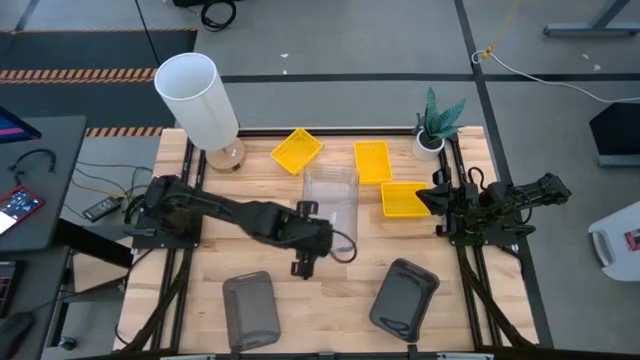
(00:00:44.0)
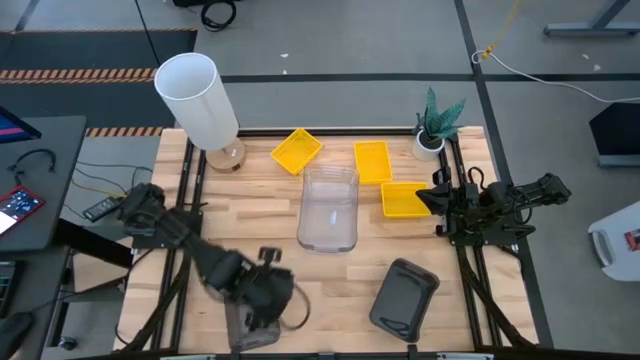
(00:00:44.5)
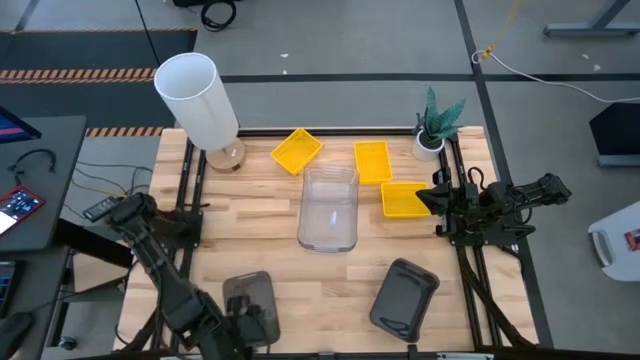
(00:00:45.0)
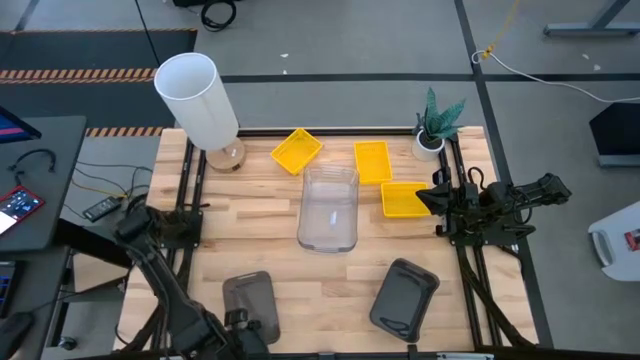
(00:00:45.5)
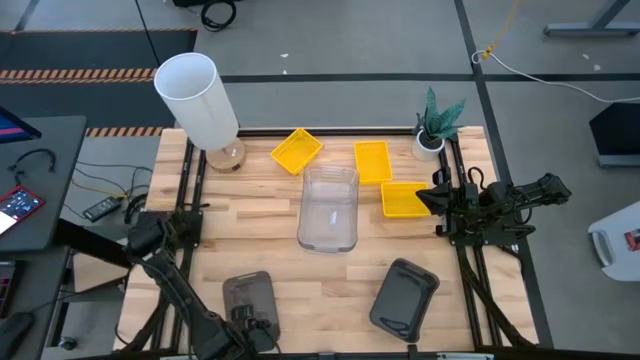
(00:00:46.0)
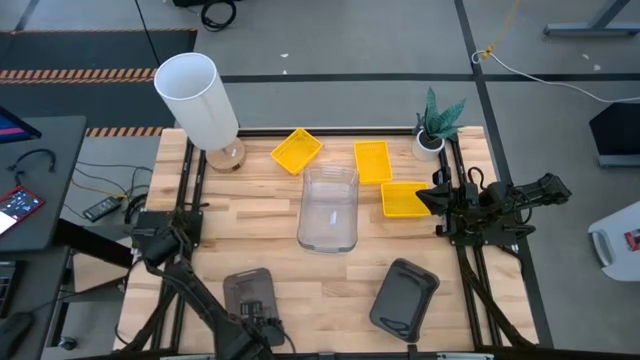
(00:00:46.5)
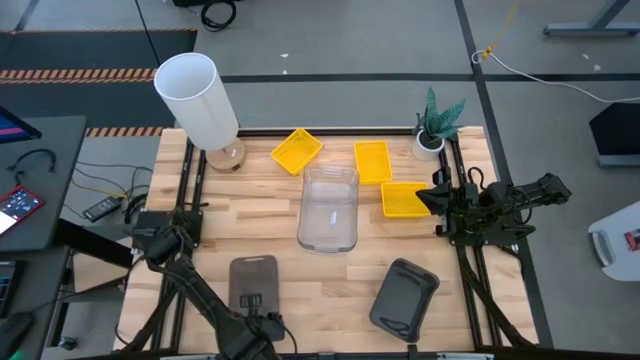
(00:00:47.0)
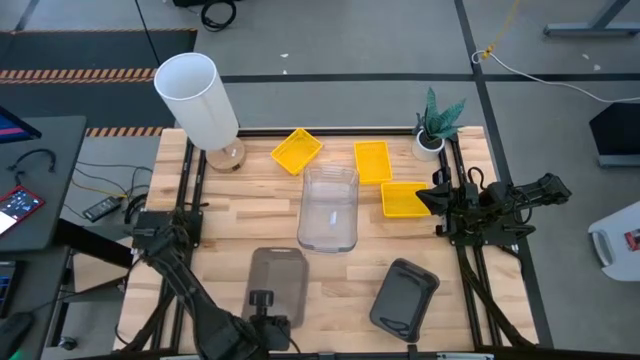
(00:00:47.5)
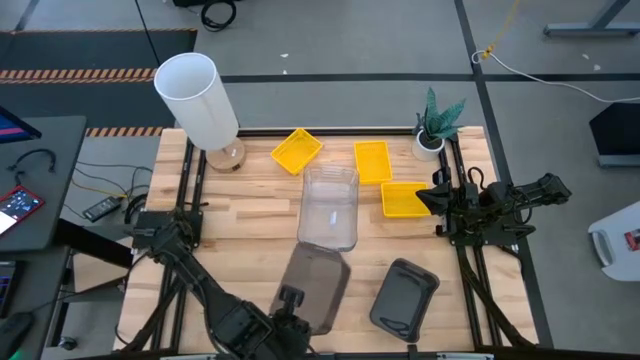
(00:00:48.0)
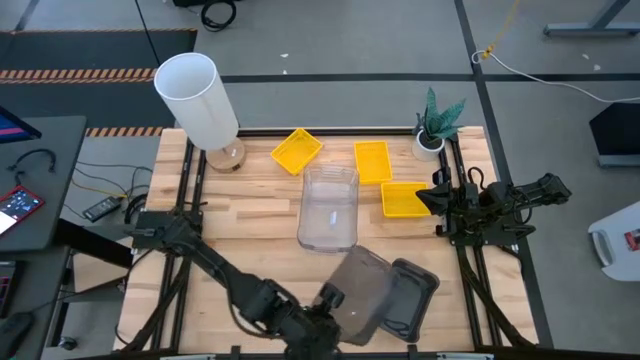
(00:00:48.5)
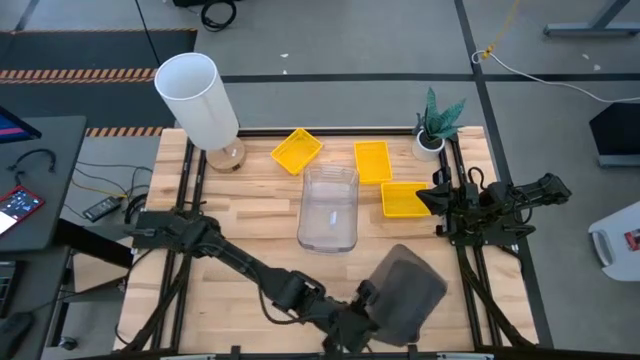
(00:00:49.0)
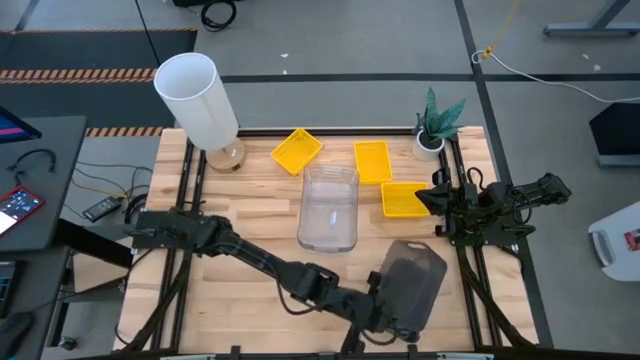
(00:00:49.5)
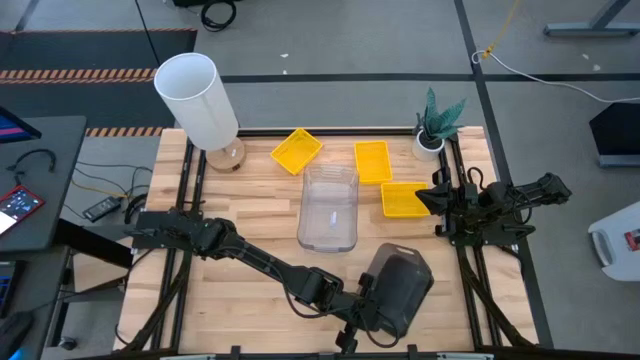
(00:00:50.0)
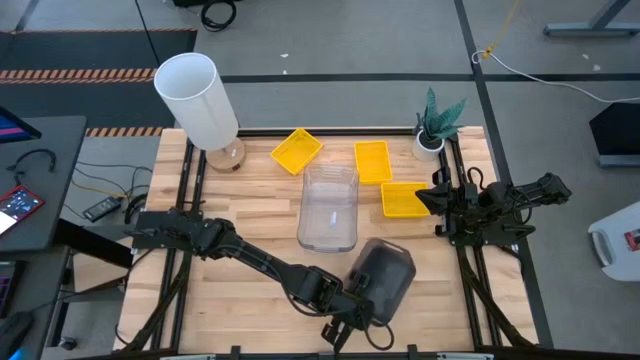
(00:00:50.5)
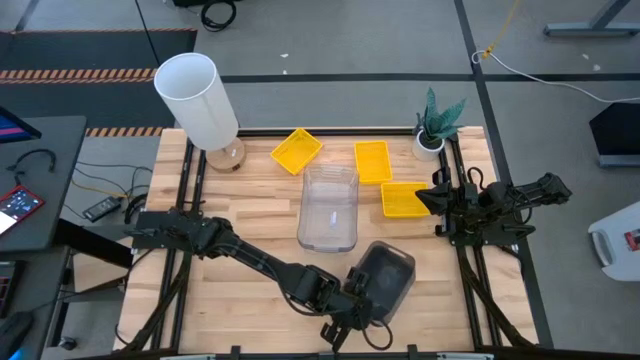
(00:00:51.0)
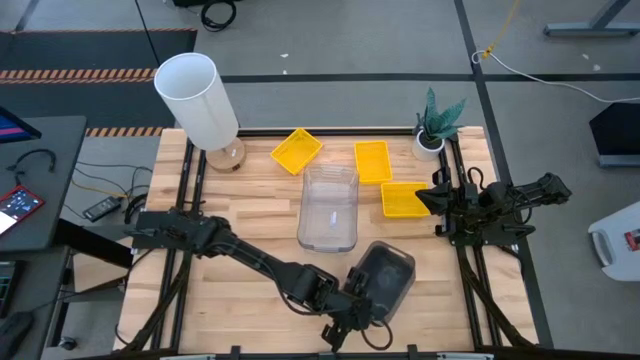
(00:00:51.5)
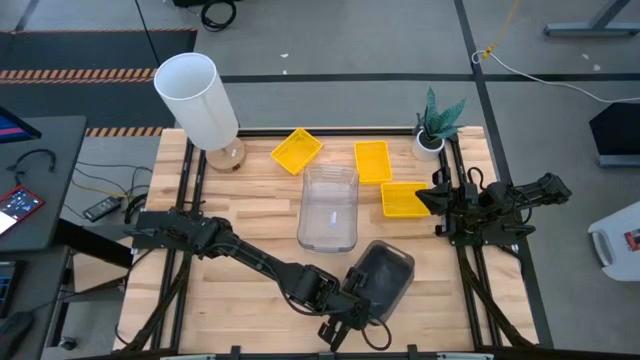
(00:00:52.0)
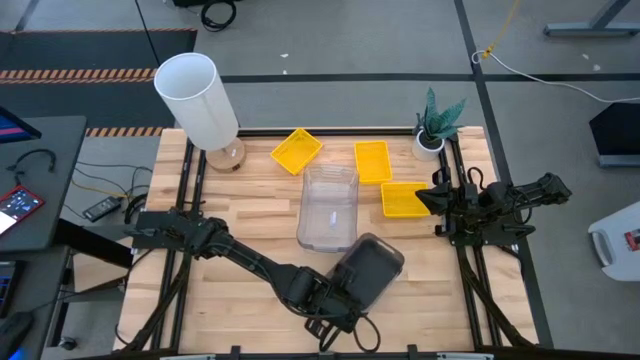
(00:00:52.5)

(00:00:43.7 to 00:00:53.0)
Stack the left black bin into the black bin

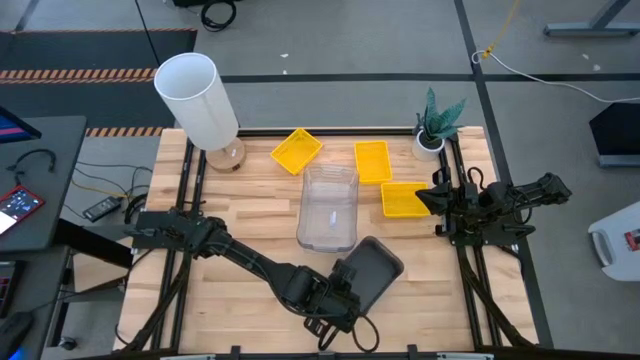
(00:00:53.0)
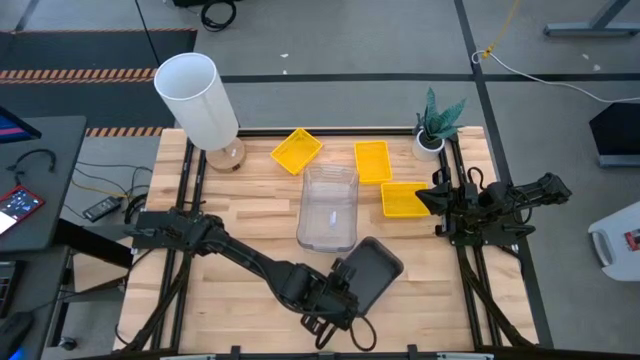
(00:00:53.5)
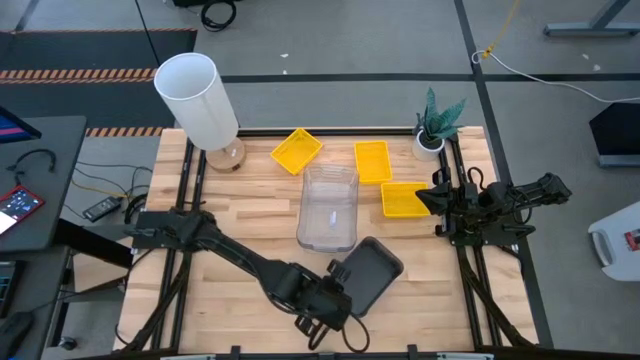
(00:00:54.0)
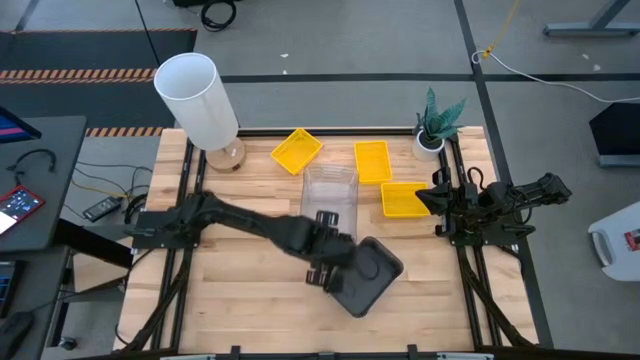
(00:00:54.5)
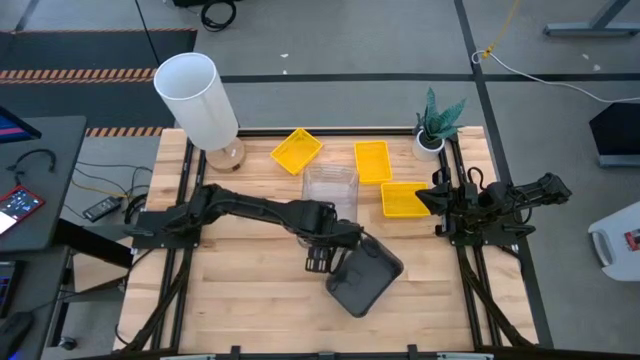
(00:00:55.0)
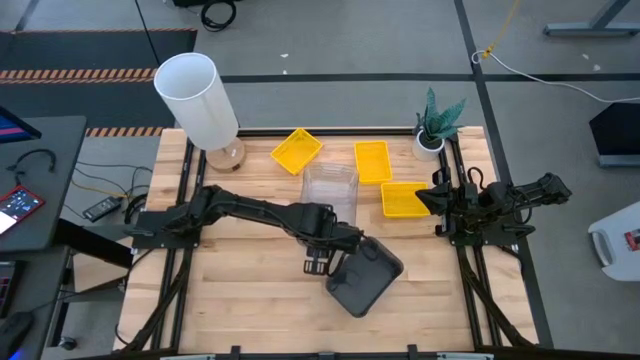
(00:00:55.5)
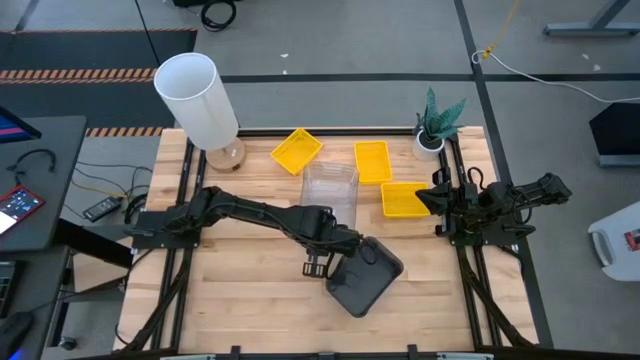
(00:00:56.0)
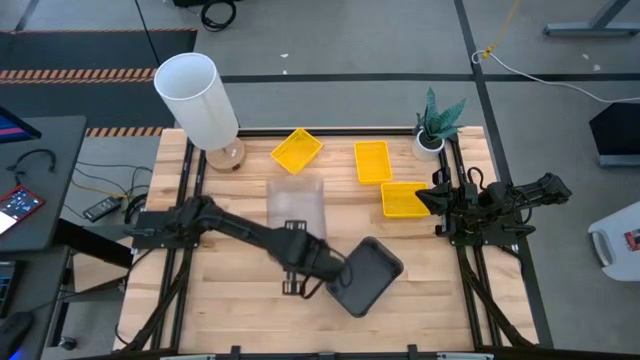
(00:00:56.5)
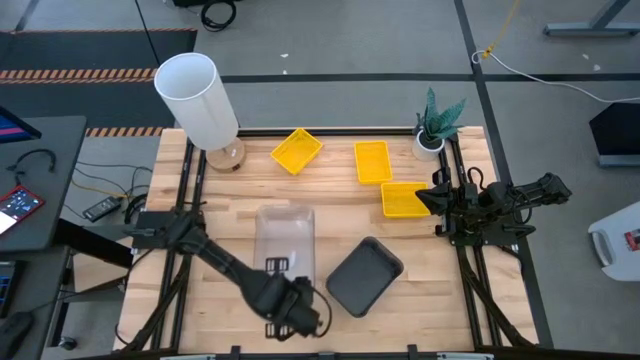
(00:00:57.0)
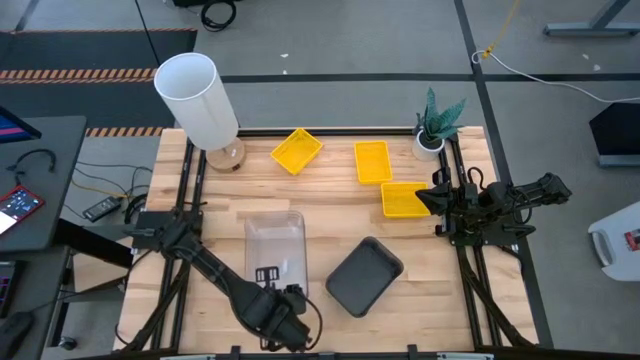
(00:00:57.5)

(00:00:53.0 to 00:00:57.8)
Move the transparent bin to the center of the table

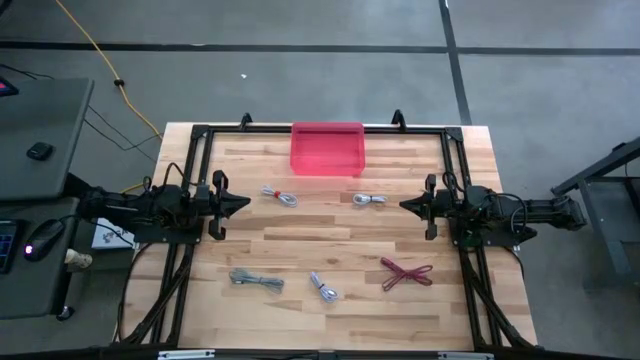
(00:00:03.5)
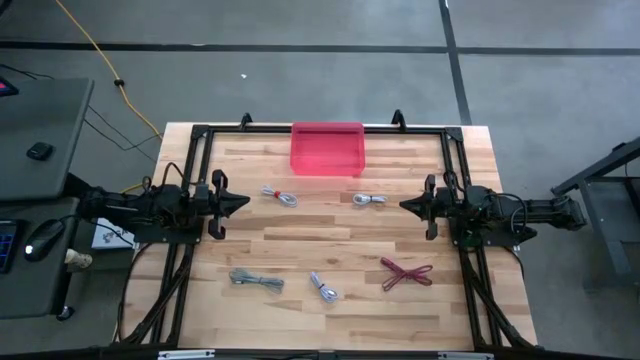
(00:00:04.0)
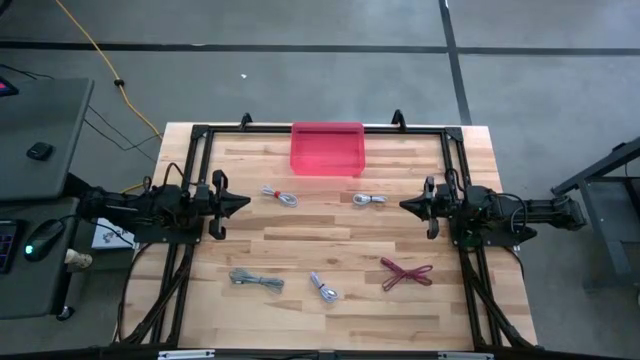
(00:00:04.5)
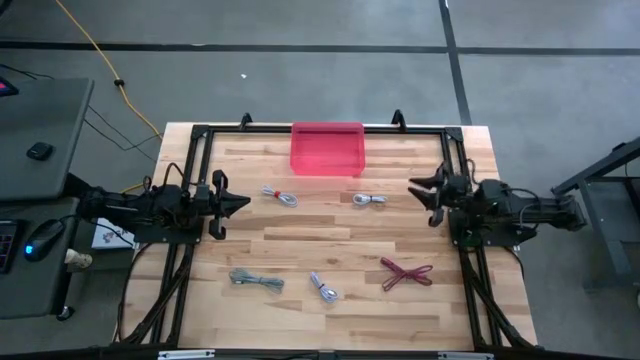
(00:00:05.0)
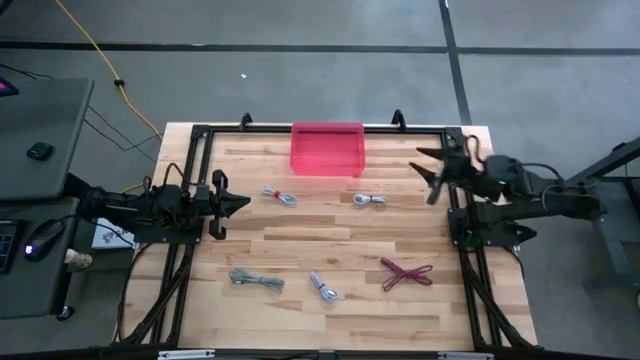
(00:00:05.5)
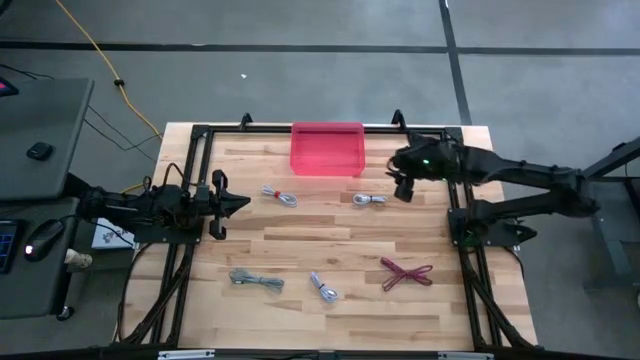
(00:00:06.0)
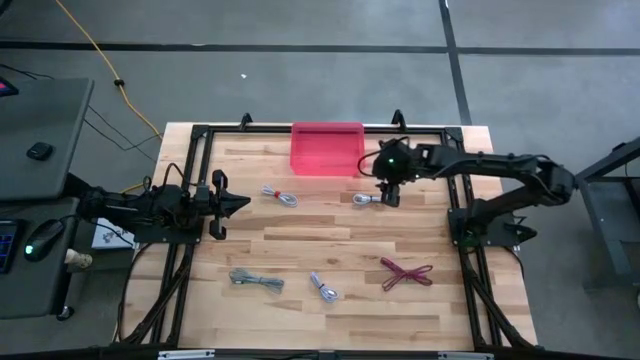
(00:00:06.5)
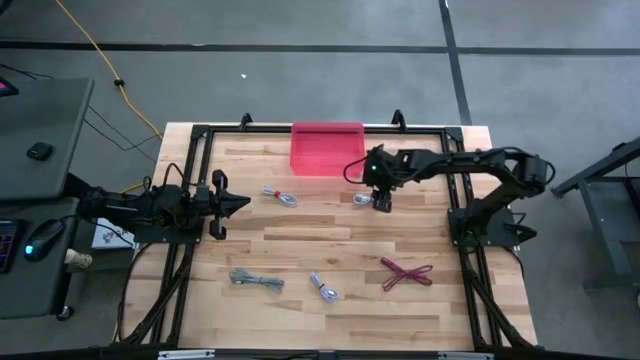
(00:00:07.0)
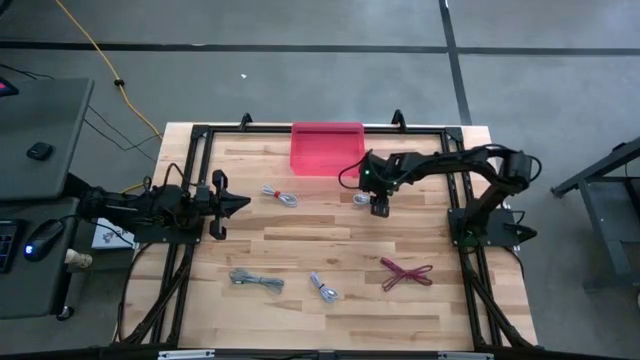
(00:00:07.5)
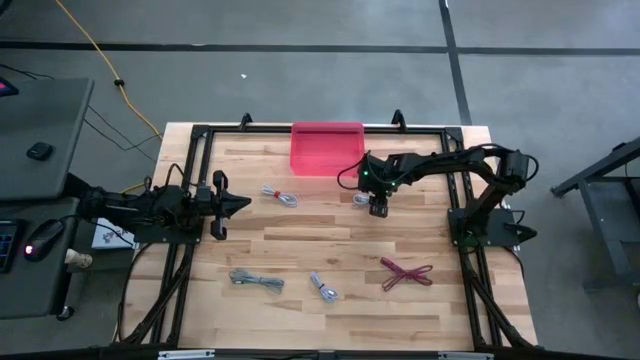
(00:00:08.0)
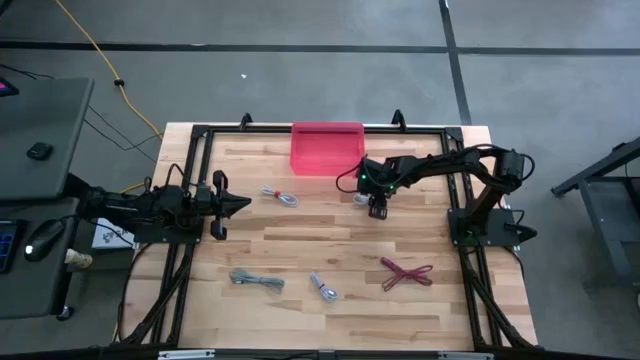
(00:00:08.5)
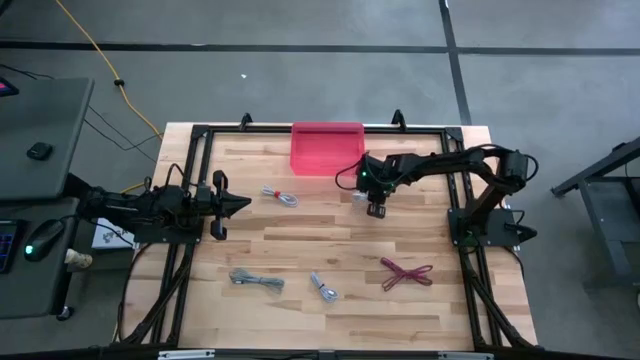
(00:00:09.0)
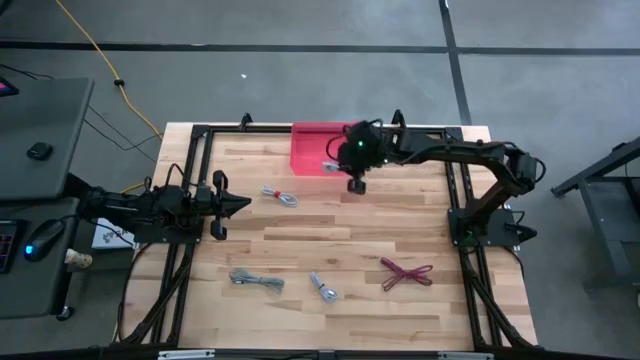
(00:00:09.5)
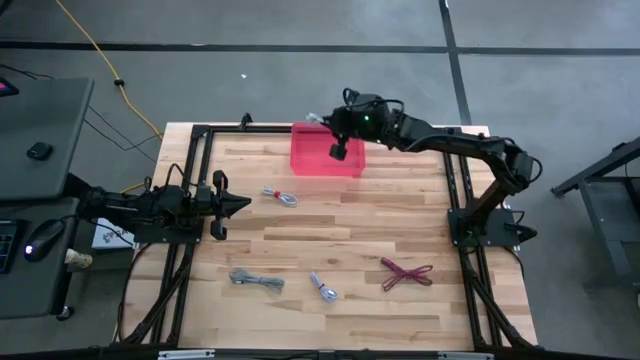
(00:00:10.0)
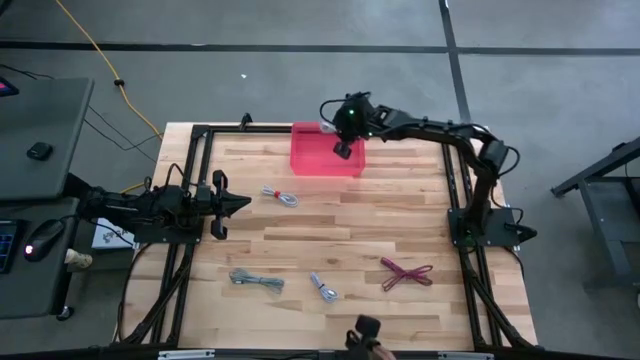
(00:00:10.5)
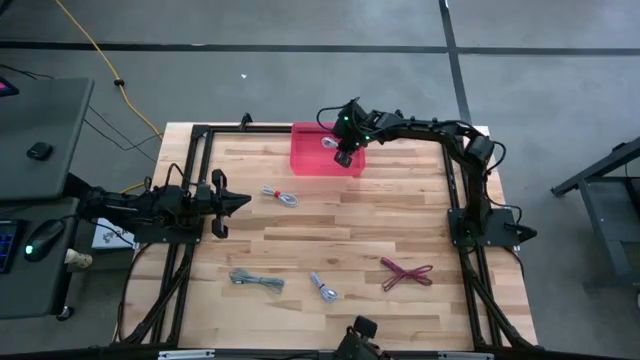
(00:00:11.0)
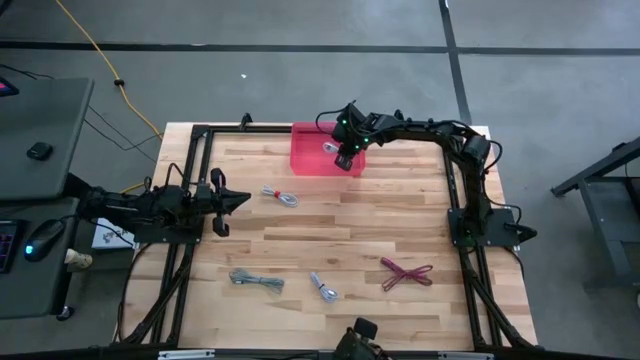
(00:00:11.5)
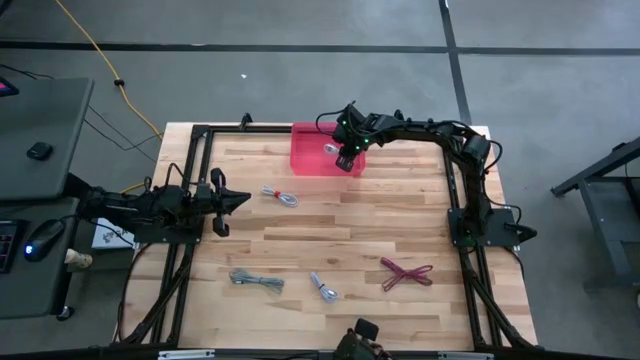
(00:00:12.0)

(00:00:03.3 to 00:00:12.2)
Put the right white charger cable into the pink bin
